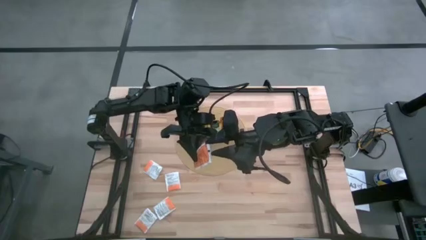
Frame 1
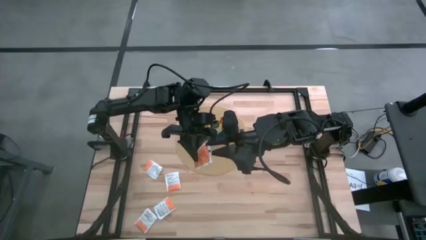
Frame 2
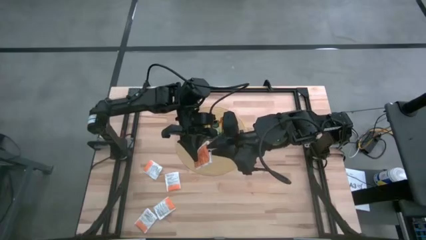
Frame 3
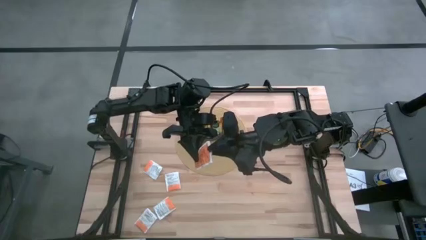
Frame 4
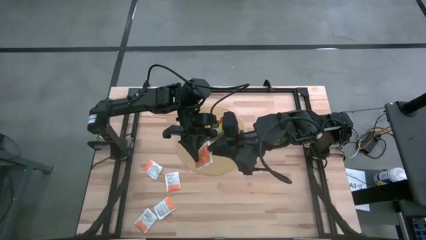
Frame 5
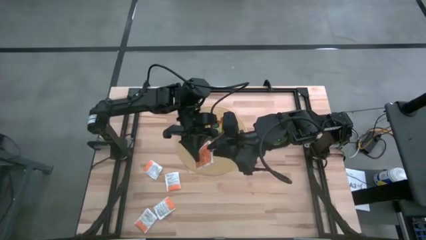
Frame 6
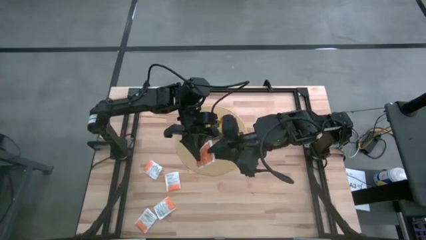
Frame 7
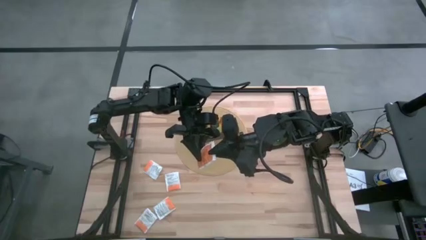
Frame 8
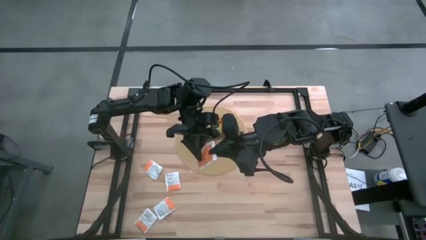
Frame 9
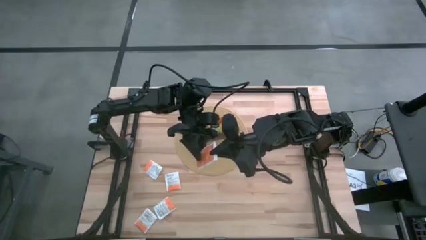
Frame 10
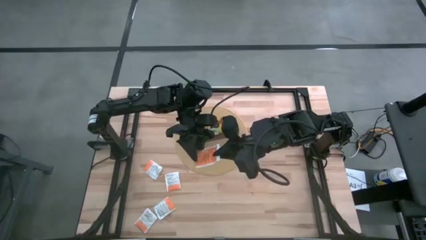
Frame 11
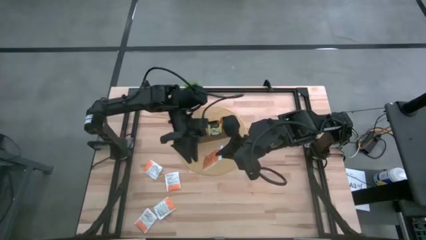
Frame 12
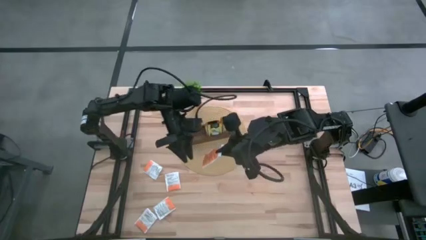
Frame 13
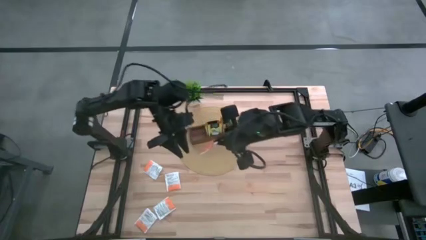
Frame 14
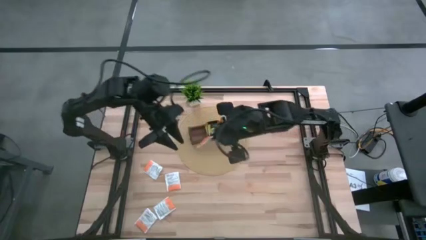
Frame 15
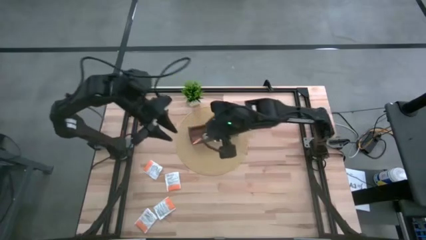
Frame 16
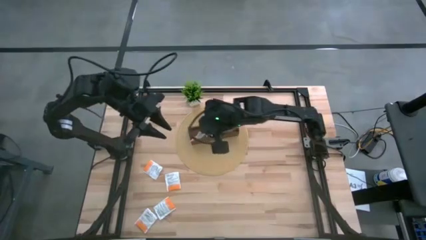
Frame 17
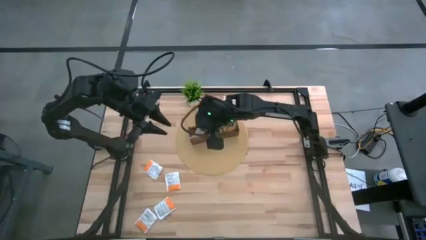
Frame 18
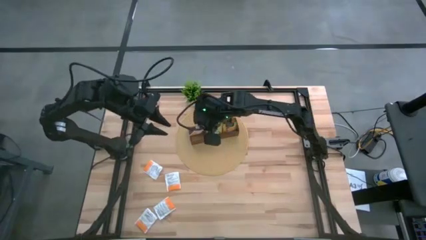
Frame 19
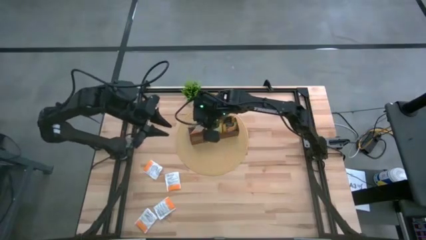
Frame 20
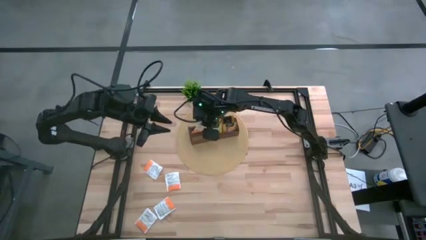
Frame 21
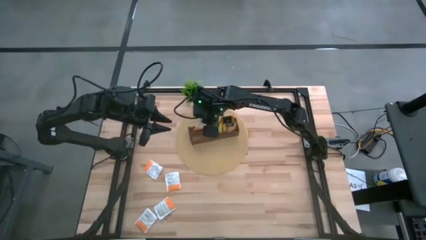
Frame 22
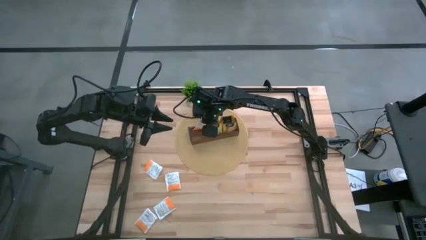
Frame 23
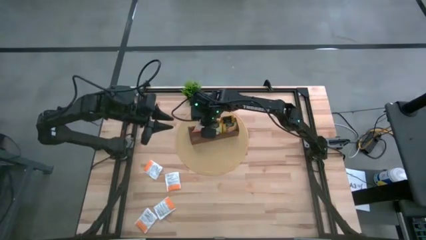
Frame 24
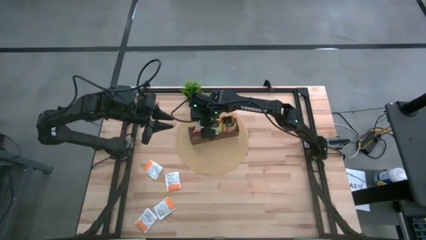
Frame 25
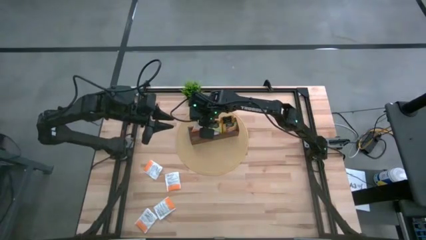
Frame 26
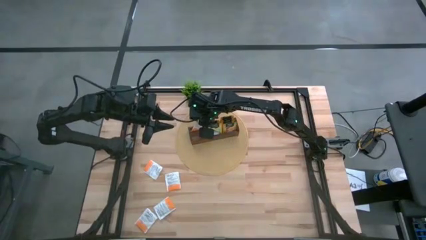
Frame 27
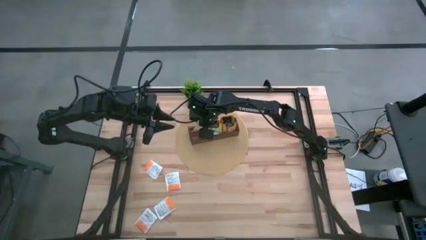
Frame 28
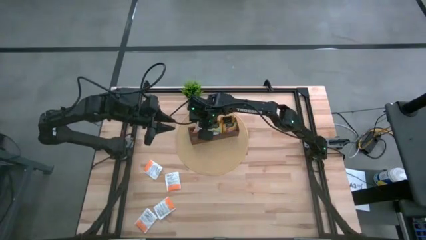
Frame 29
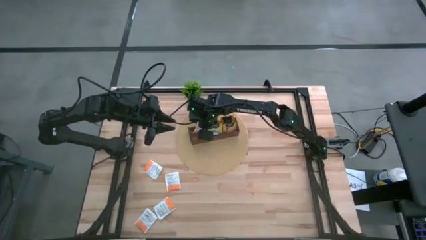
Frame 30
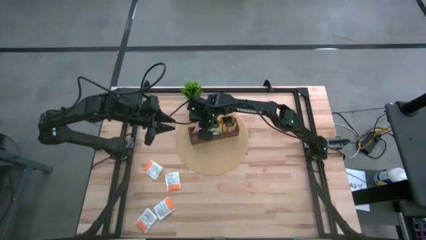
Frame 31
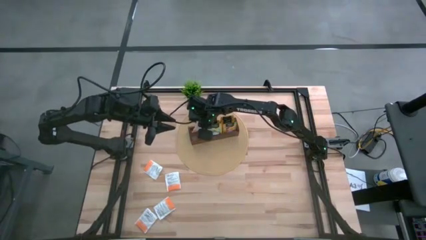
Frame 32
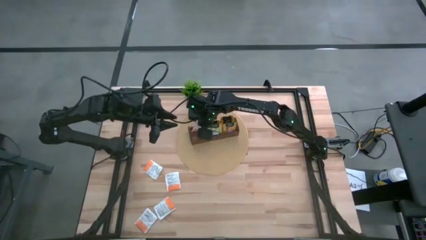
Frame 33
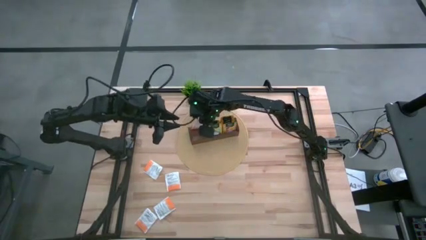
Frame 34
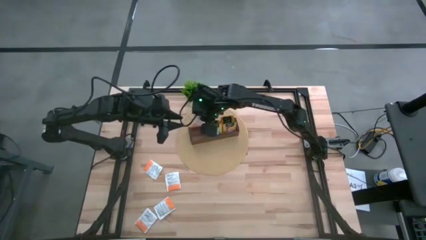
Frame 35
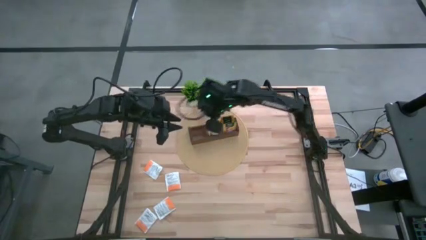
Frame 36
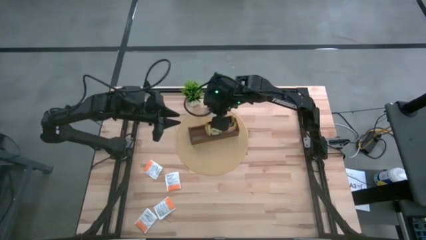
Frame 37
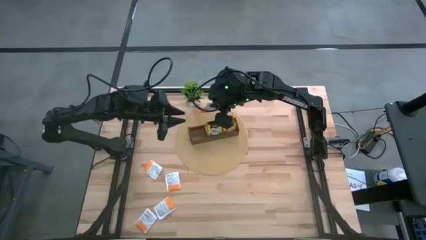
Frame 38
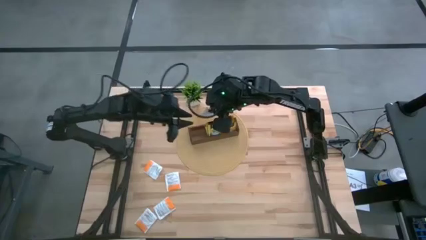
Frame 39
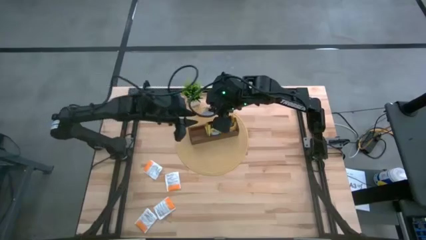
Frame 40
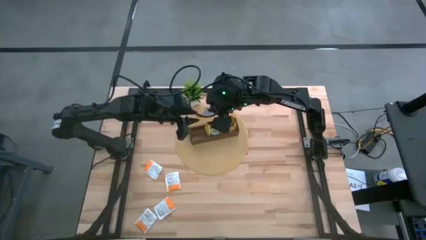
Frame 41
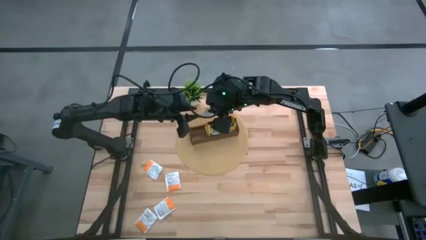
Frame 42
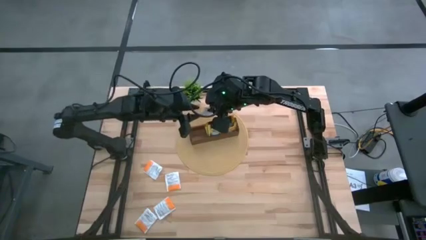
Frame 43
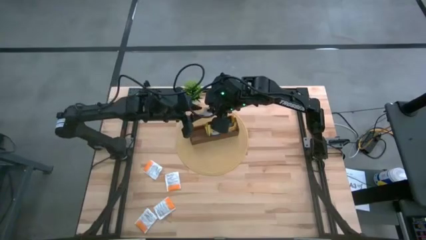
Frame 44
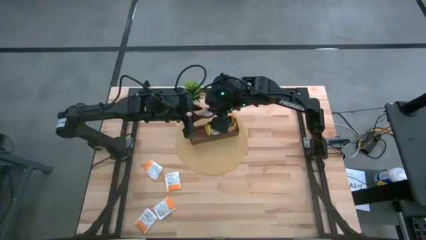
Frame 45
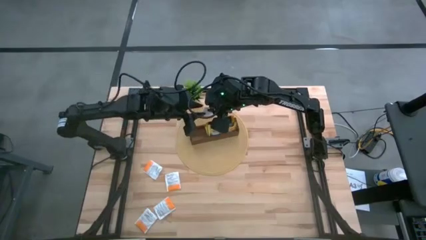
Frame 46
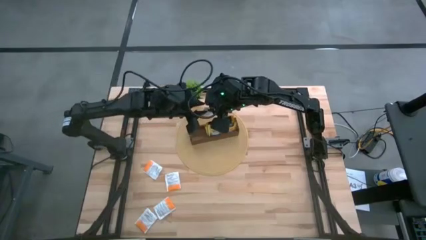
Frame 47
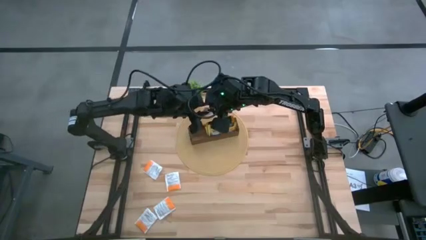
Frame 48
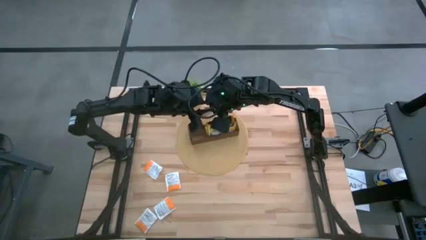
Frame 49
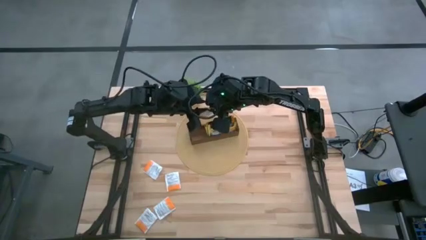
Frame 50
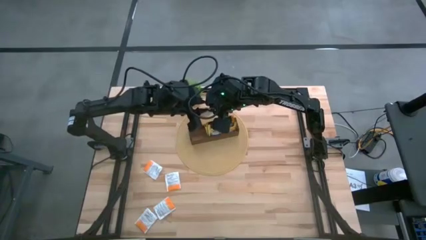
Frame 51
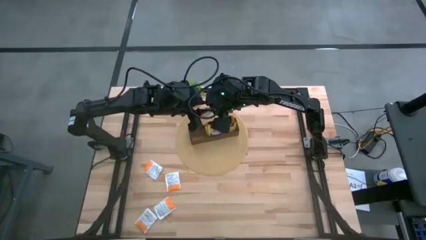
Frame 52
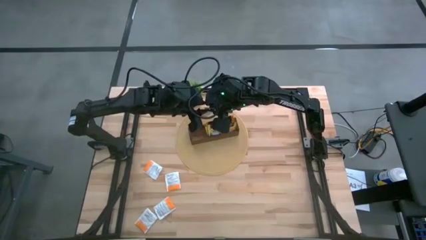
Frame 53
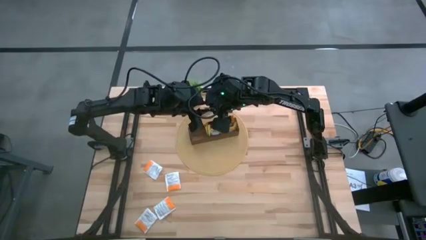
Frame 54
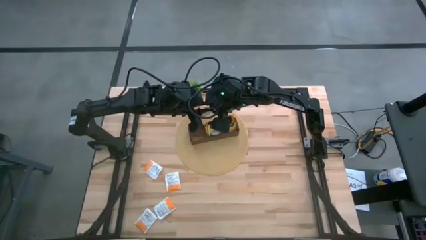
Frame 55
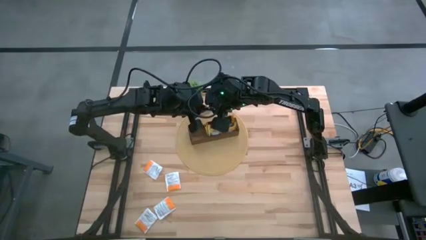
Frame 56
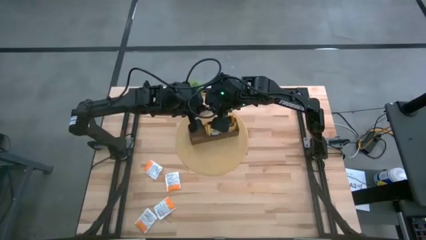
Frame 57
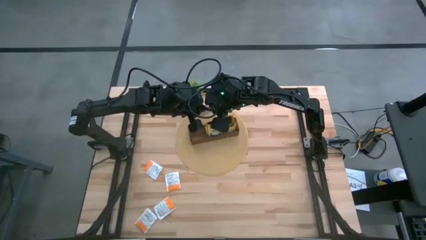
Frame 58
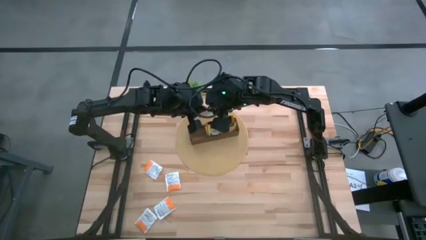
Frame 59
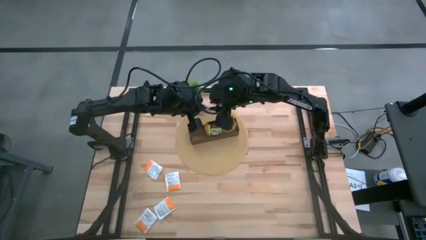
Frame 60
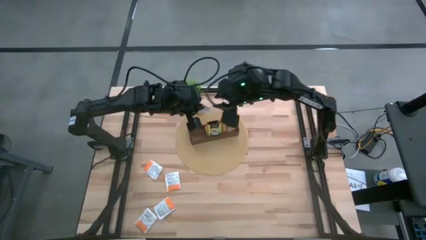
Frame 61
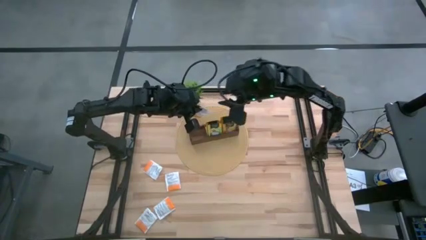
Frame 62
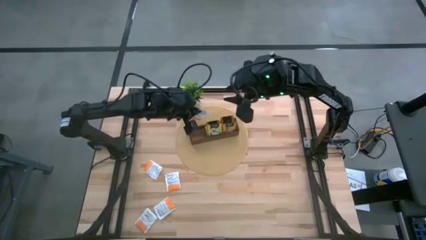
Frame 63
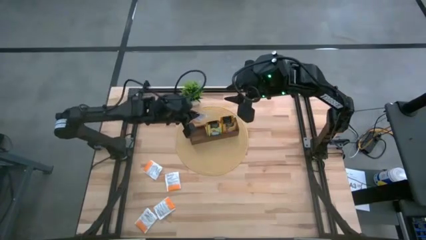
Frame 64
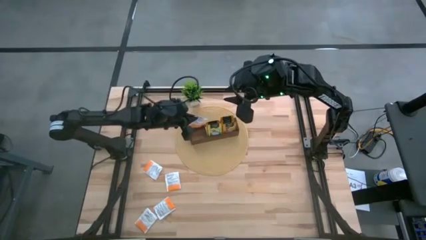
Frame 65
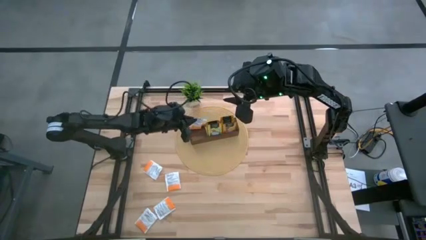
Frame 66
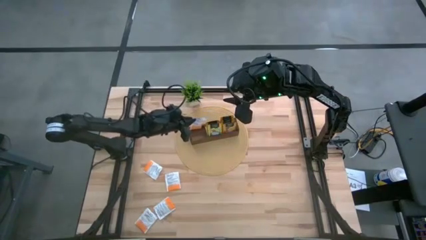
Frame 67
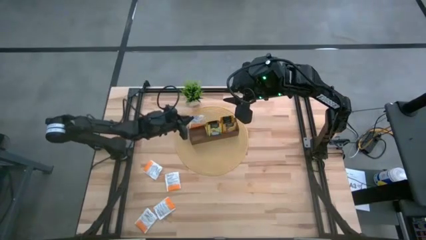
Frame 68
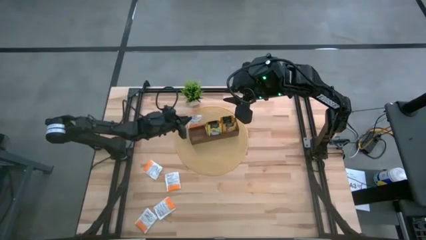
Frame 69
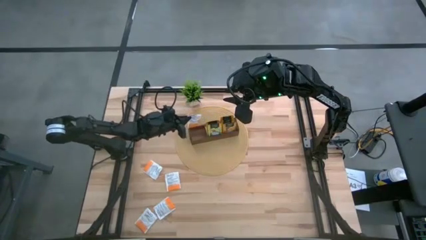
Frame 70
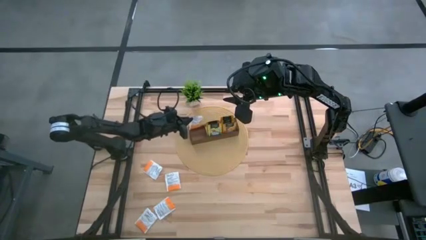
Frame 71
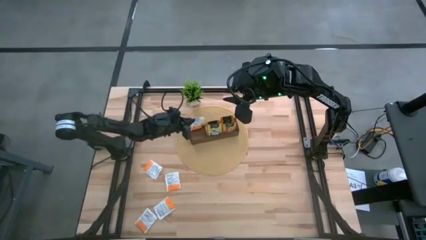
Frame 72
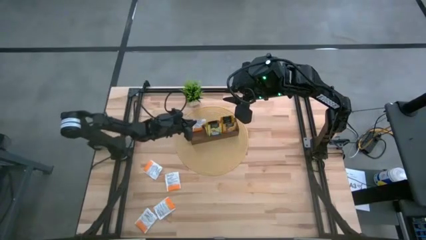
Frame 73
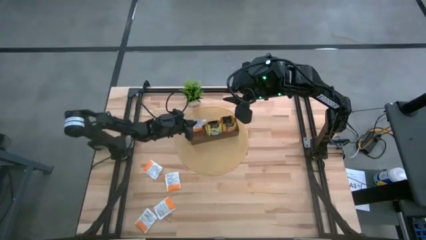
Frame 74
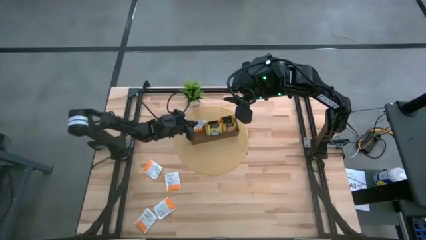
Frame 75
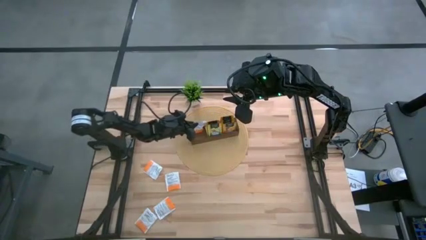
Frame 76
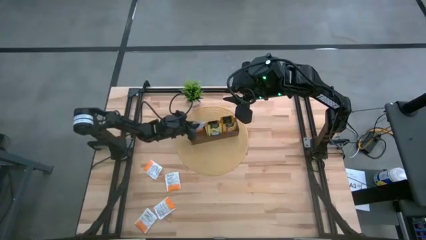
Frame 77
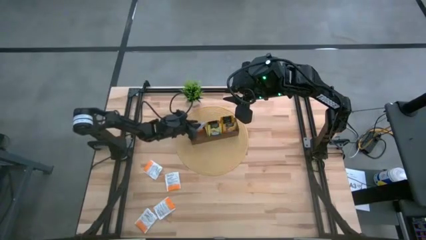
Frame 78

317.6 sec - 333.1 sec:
Task: Pick & Place Tea
Put the white tea bag into the left section of the wooden organizer
